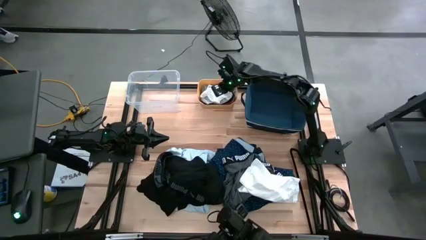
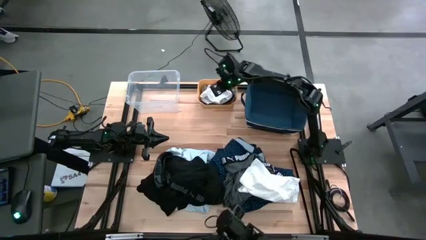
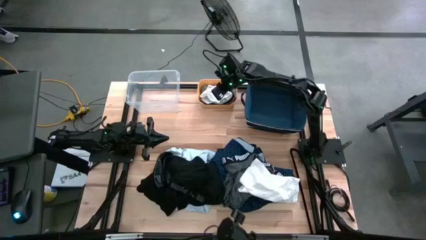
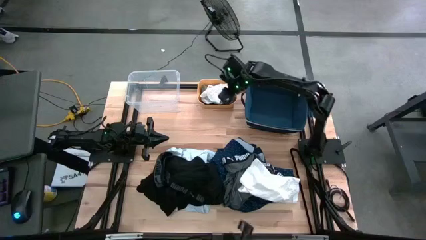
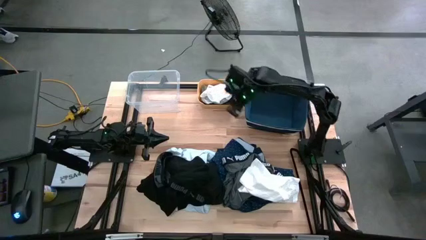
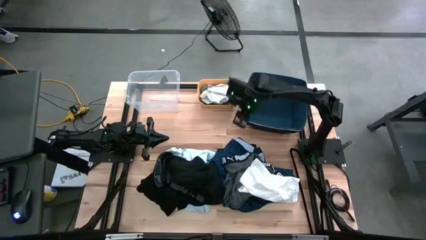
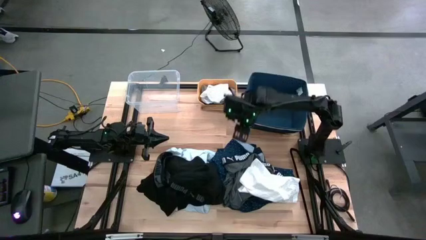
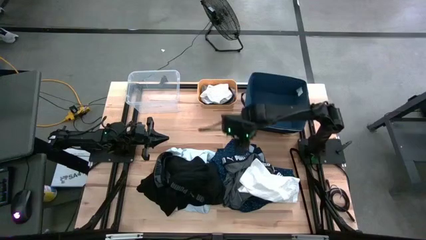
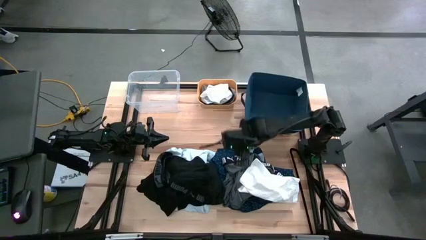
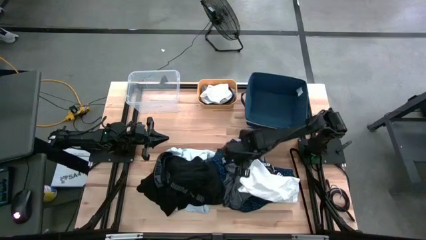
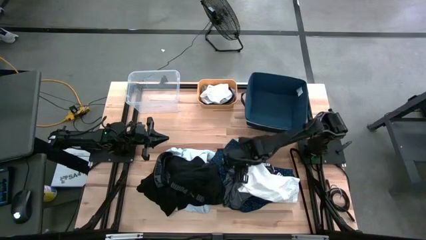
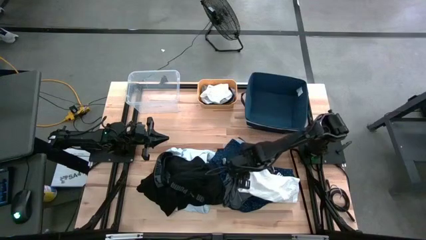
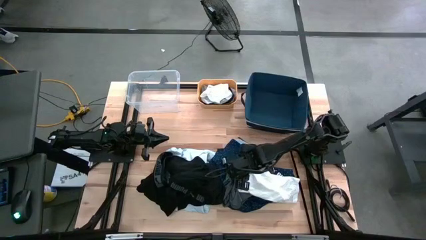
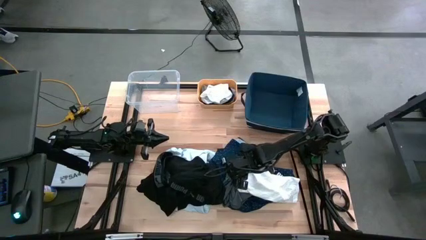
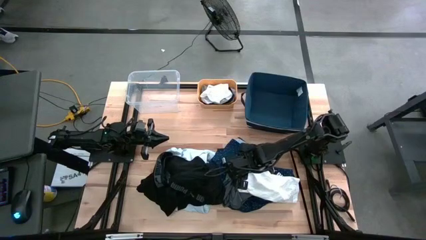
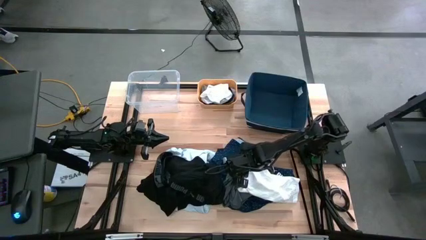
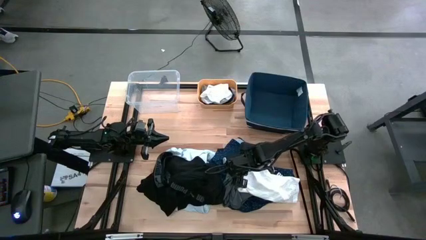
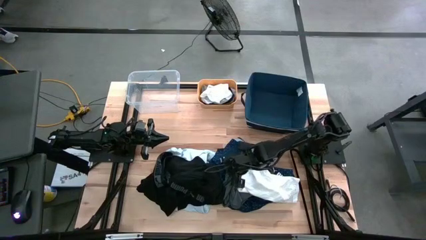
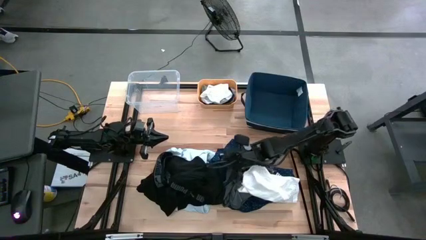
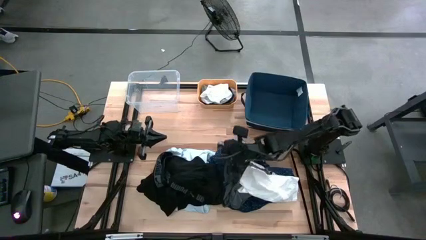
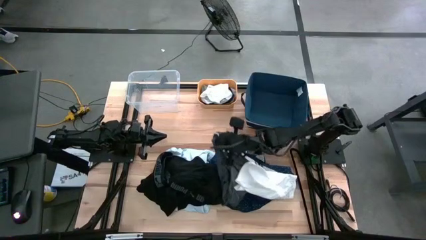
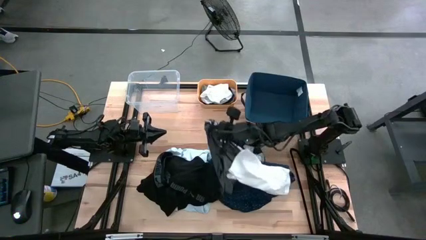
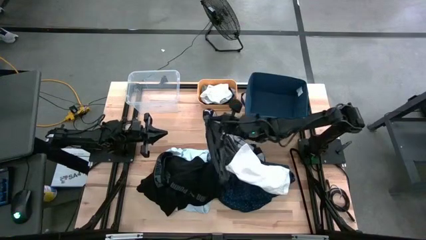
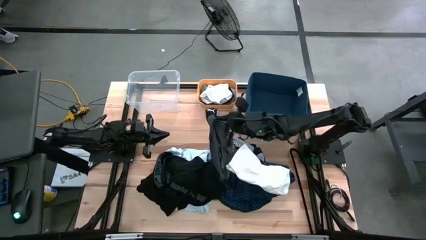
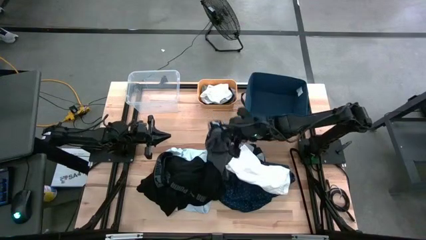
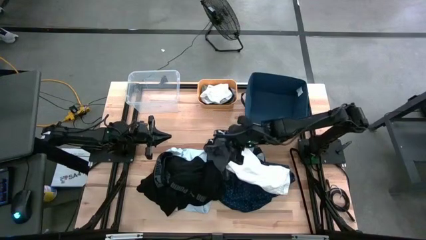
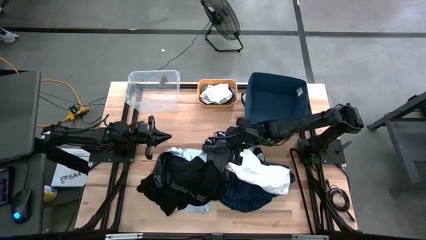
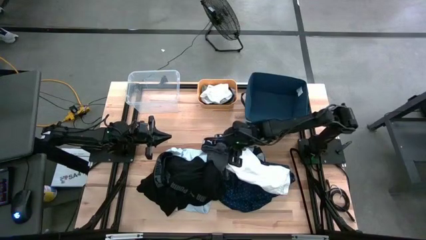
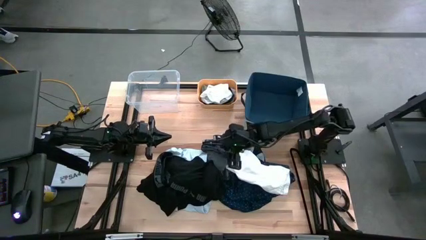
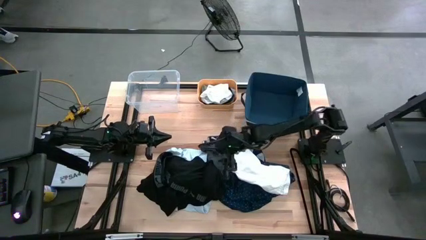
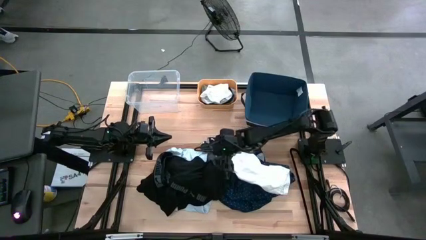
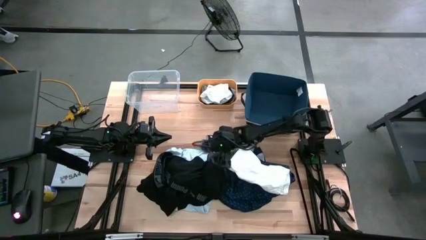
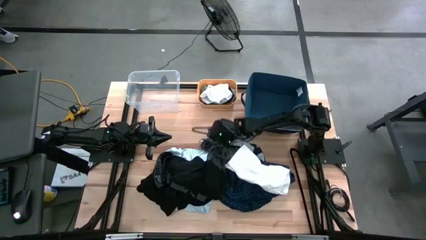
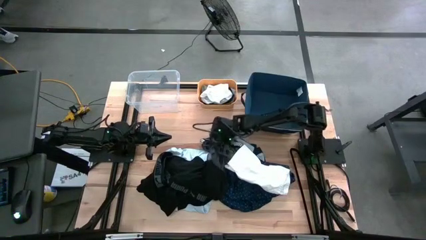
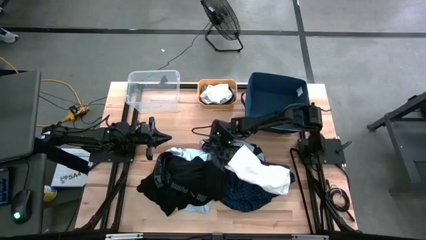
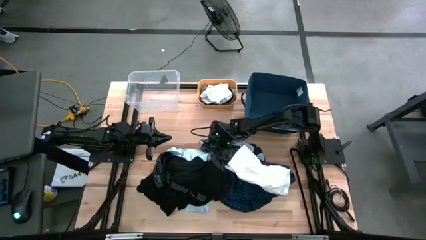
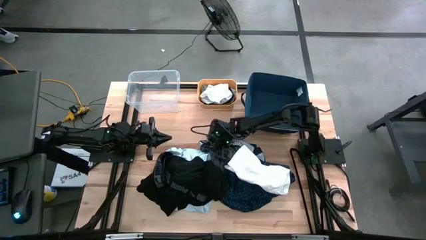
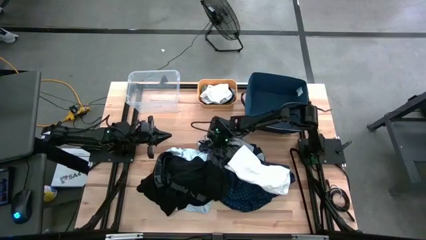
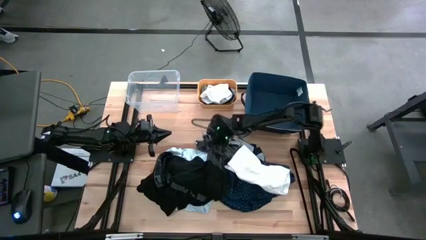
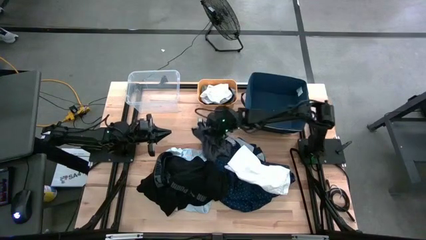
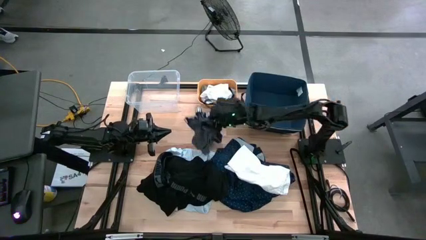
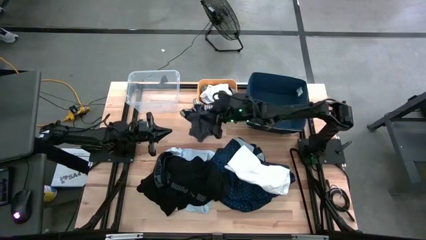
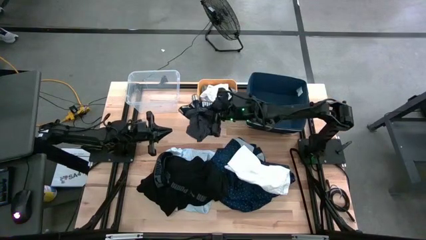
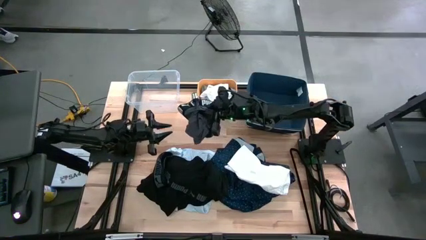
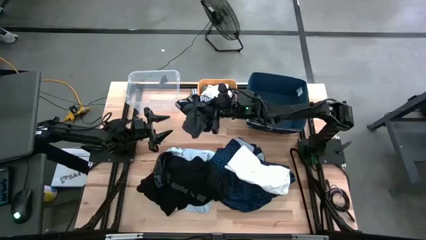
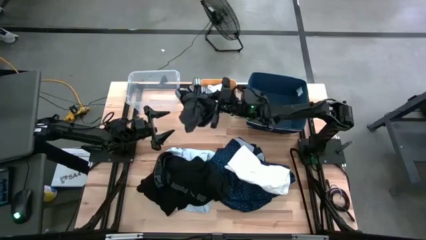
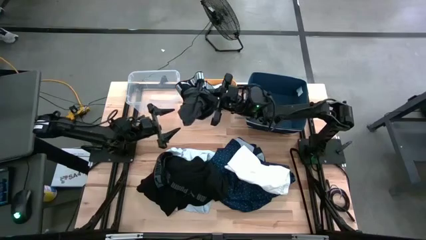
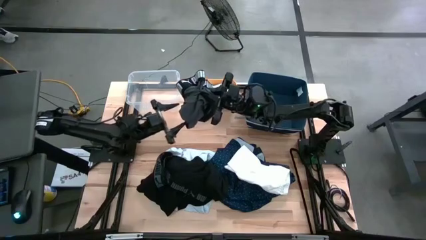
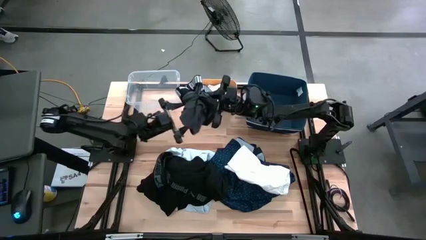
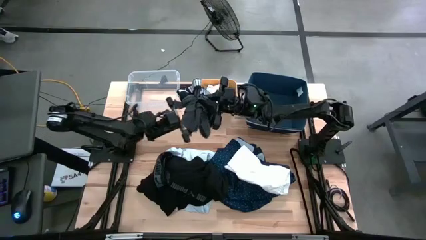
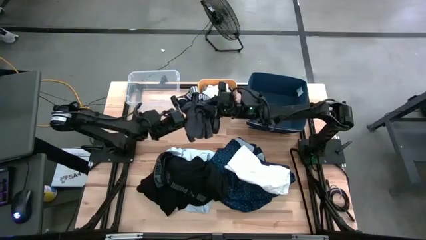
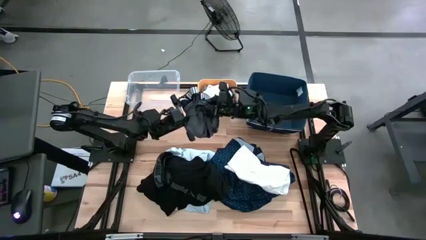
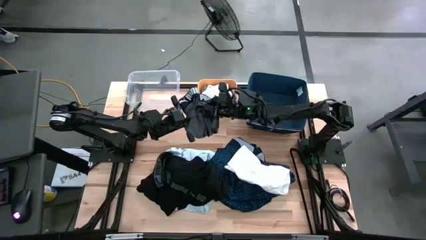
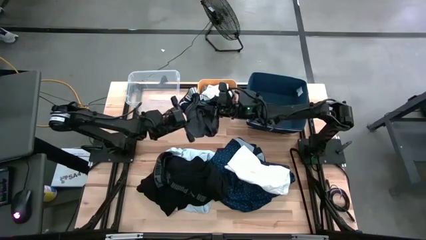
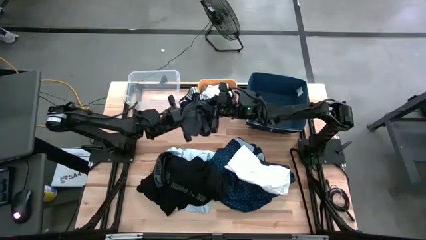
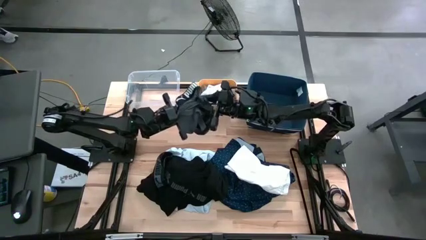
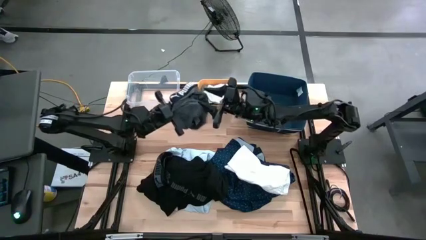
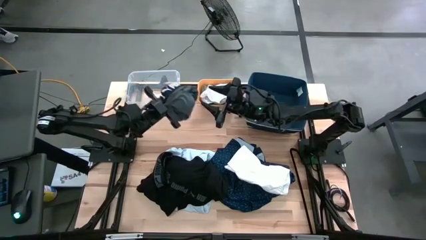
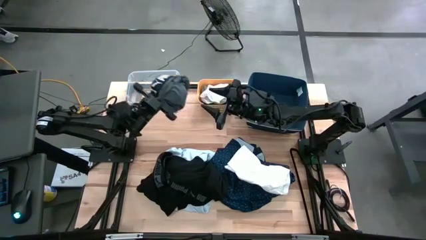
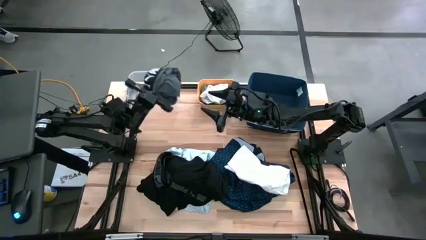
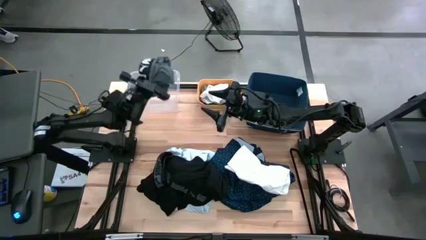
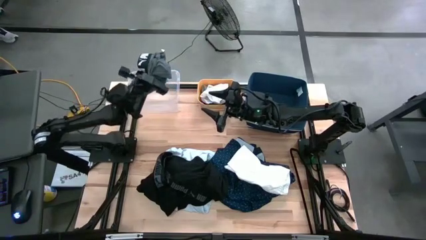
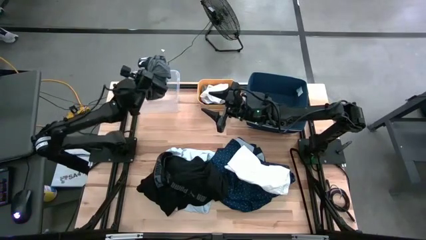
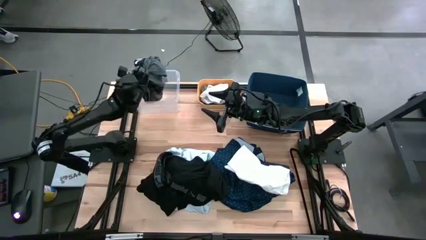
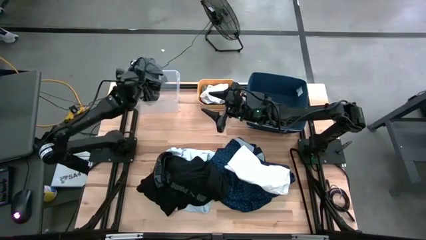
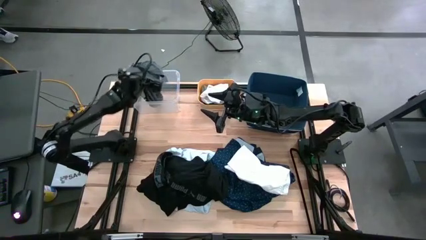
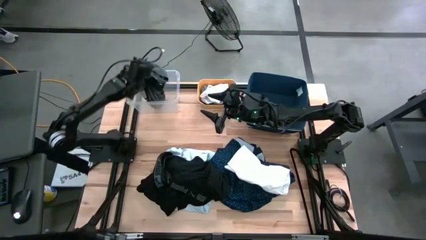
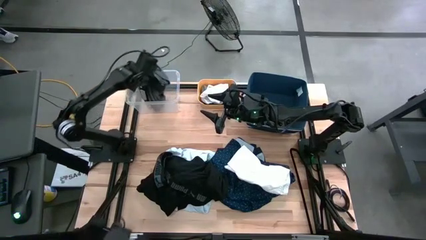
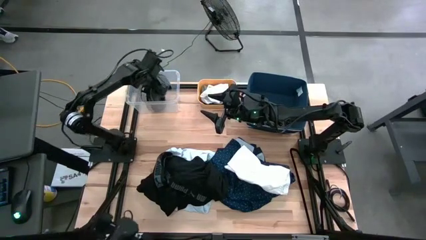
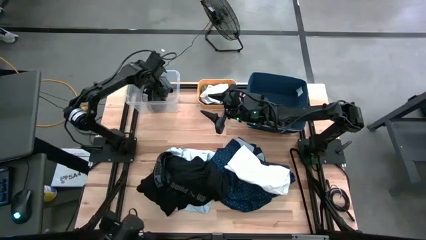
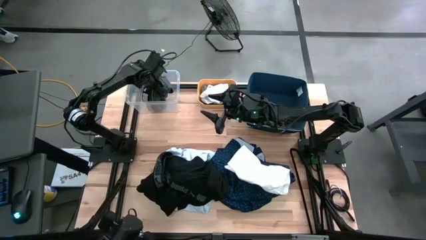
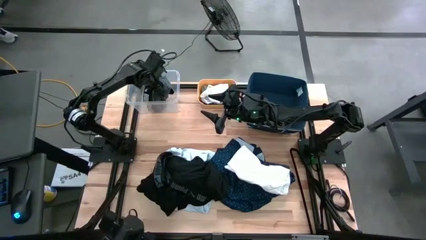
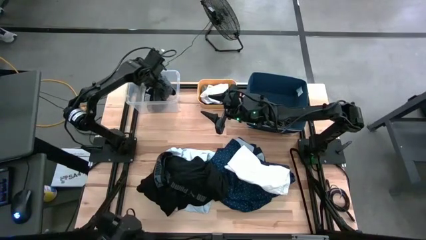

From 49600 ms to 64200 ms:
Task: Pick & Place Cloths
Put the gray underwear into the transparent bin
